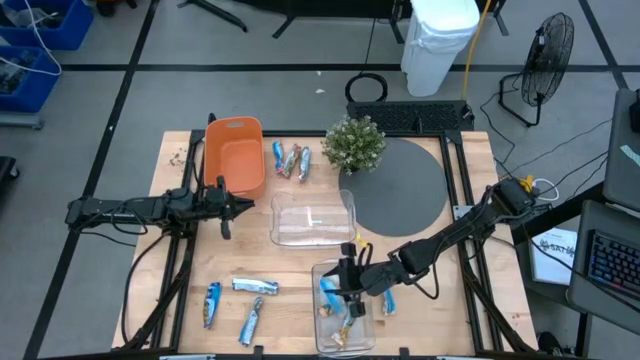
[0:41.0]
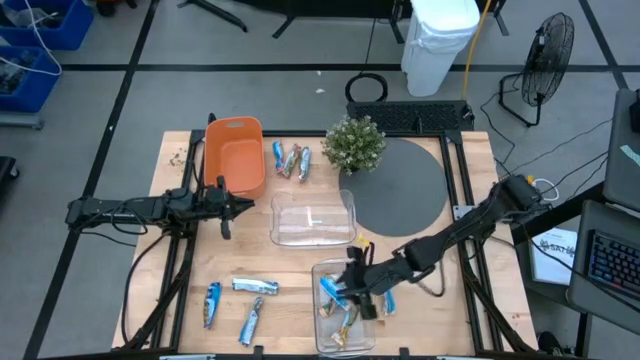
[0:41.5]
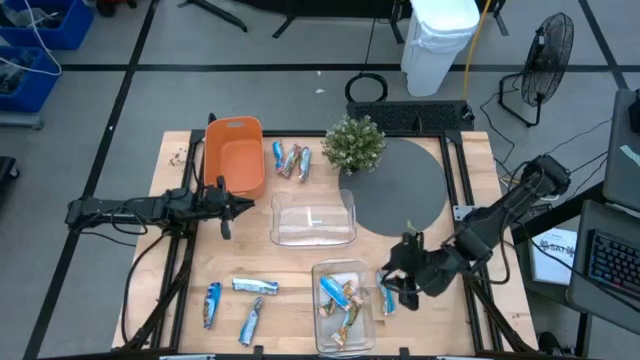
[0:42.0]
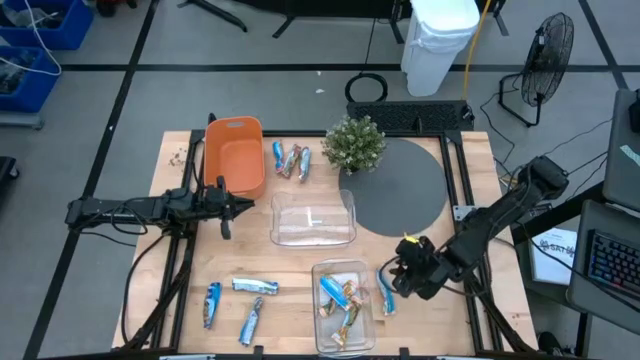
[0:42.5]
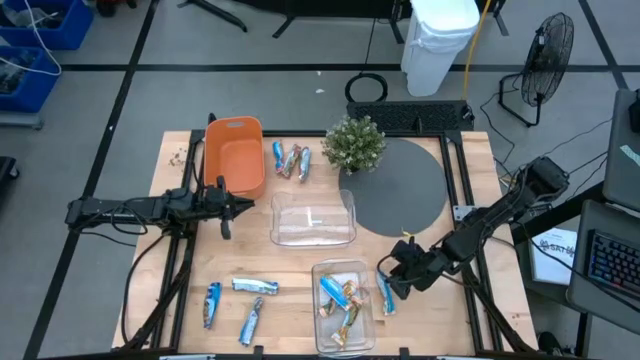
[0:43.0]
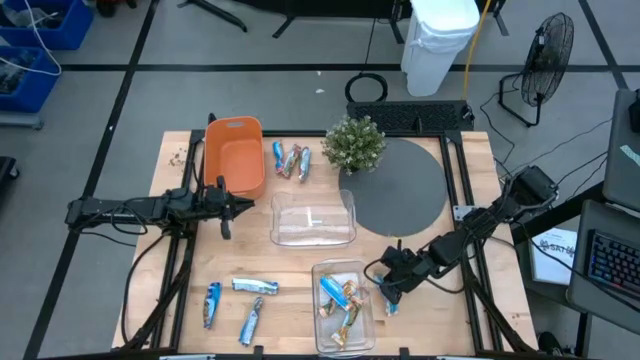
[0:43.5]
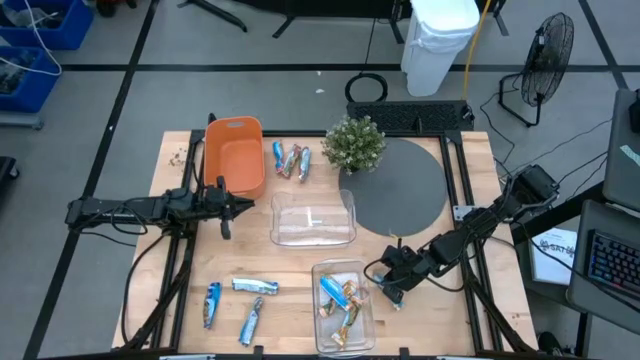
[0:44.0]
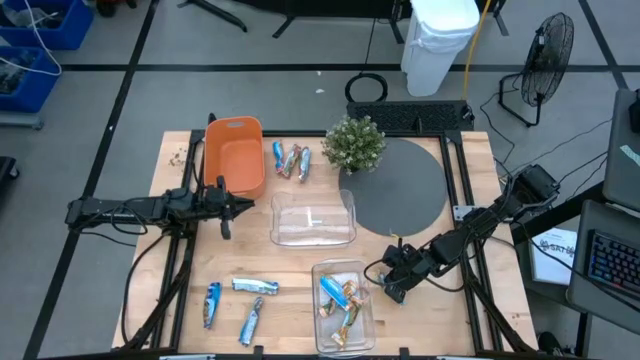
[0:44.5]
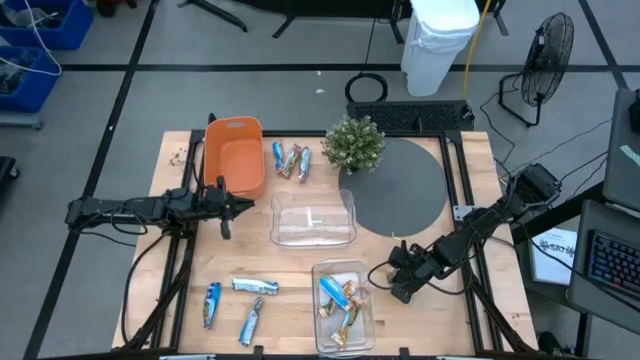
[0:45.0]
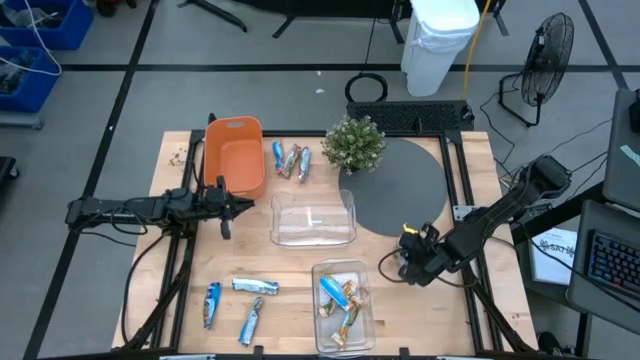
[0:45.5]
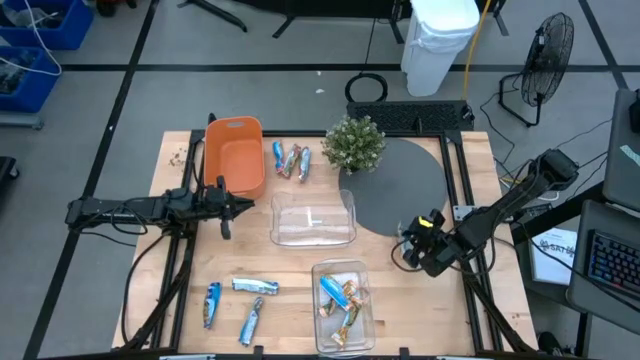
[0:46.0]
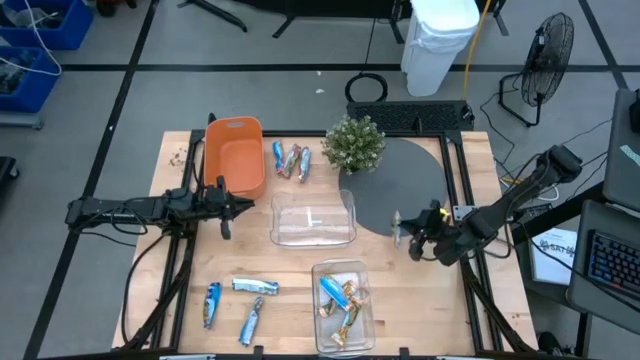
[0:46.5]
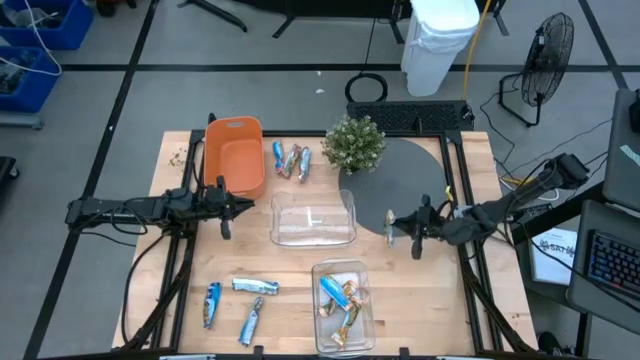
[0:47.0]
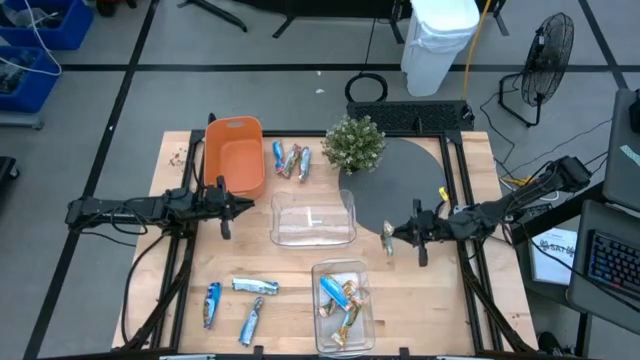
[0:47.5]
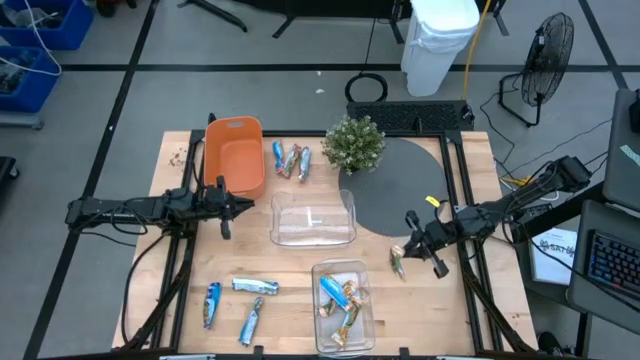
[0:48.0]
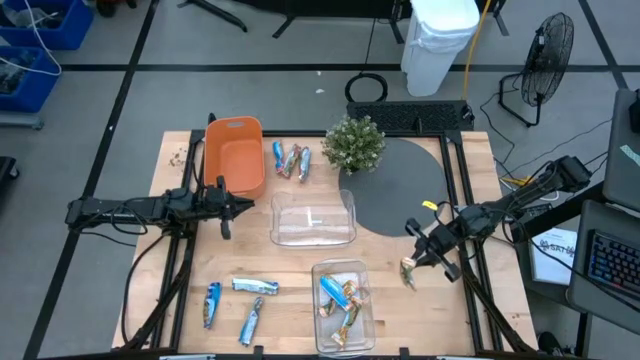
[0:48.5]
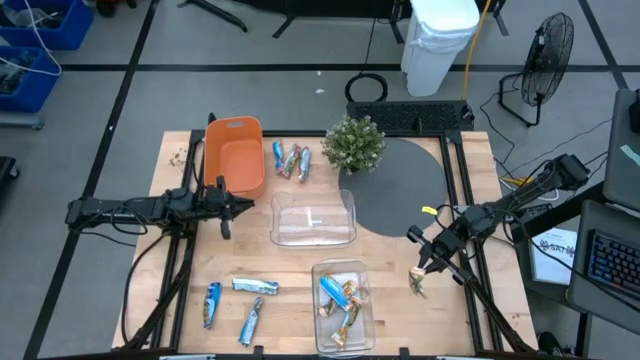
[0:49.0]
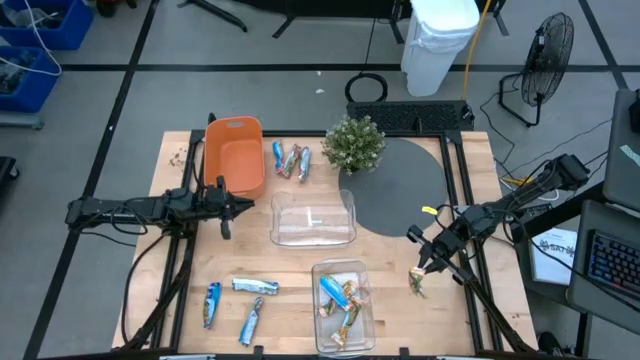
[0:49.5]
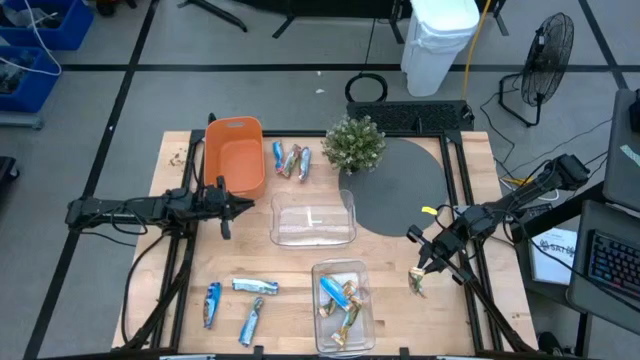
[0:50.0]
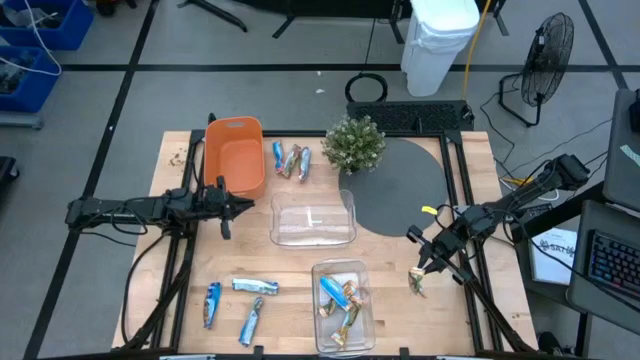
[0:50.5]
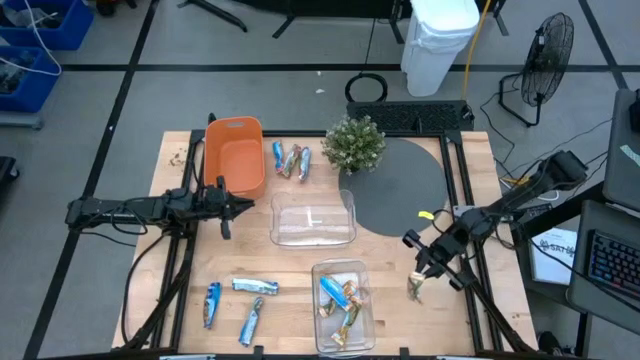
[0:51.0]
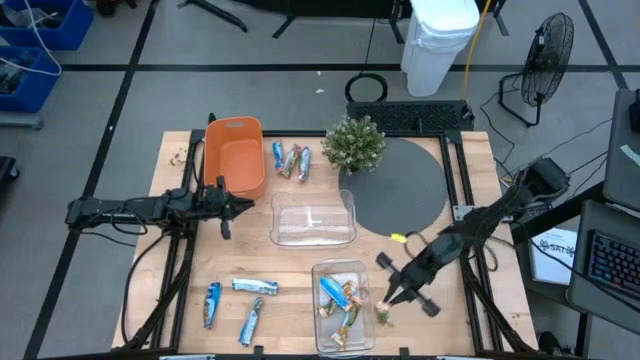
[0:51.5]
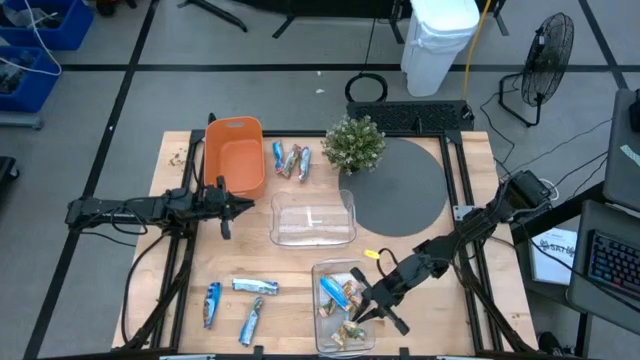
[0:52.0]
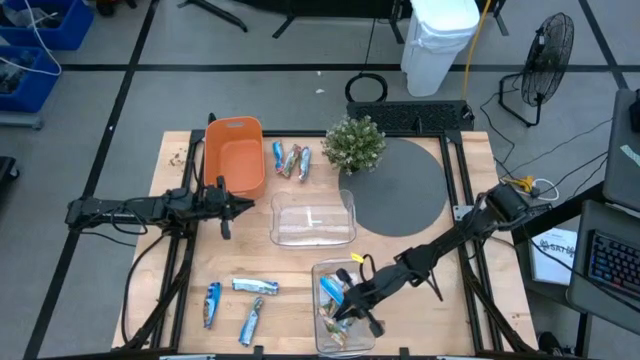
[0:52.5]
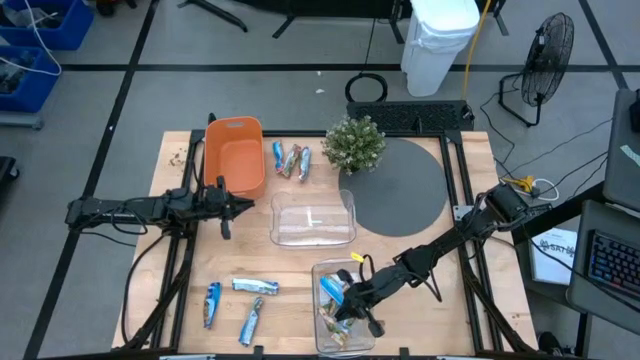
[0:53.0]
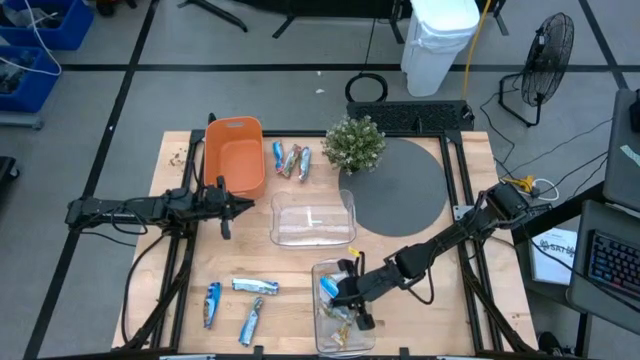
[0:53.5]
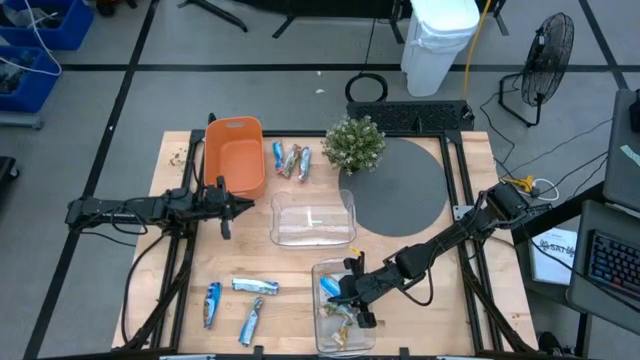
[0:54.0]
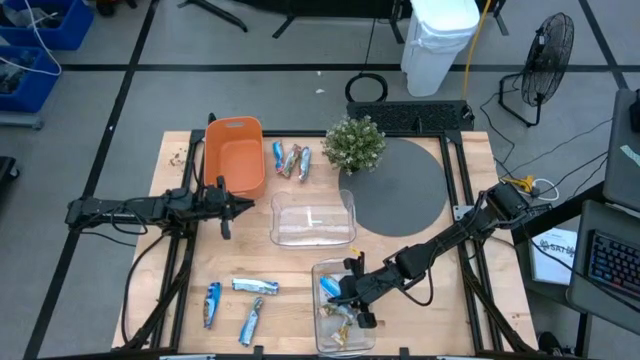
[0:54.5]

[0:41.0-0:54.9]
Task: Pick and place Granola Bars by type
Put the yellow granola bar into the bottom transparent bin

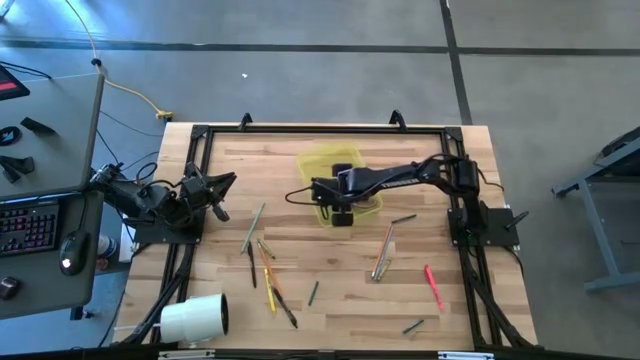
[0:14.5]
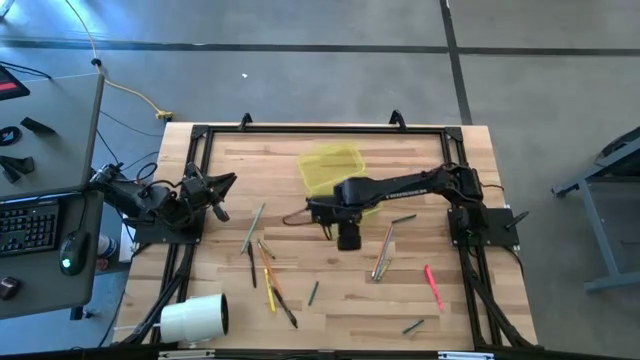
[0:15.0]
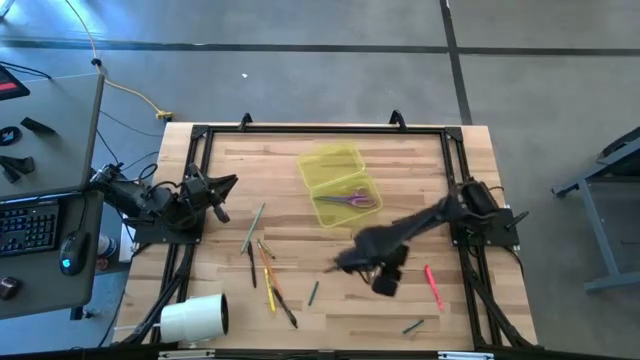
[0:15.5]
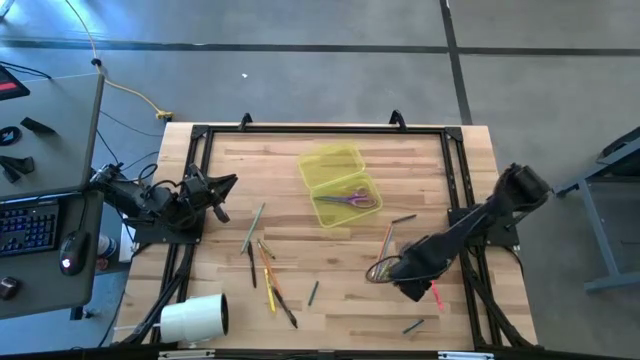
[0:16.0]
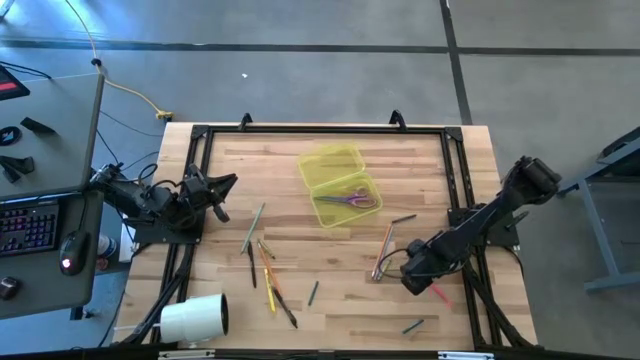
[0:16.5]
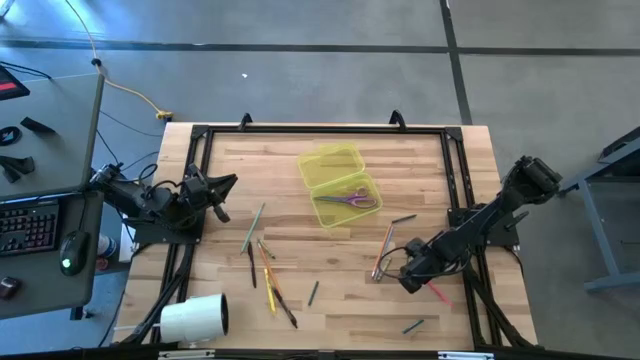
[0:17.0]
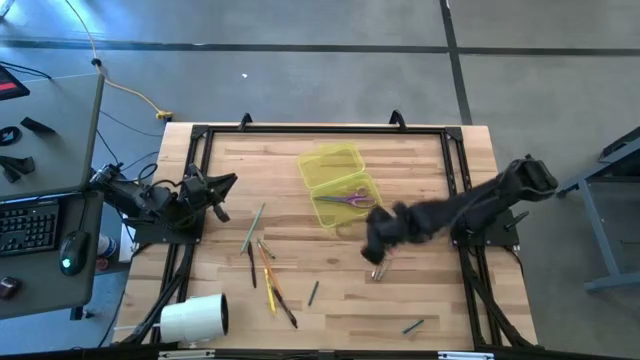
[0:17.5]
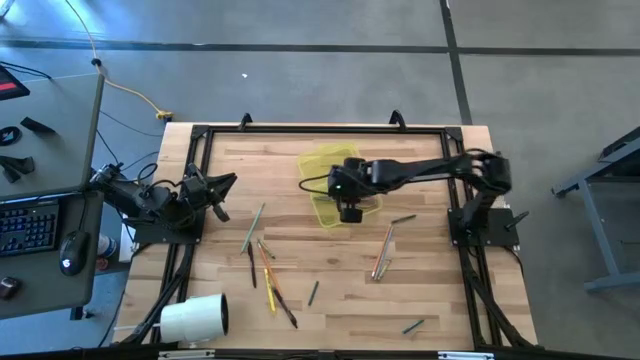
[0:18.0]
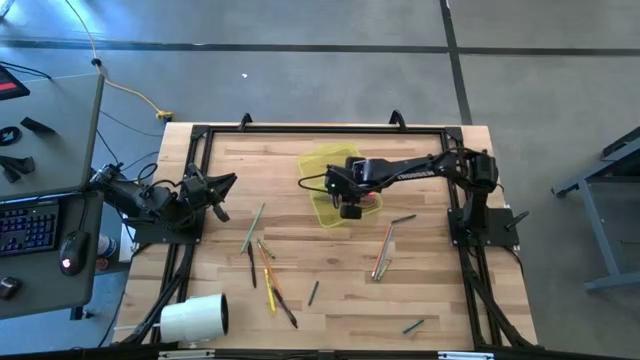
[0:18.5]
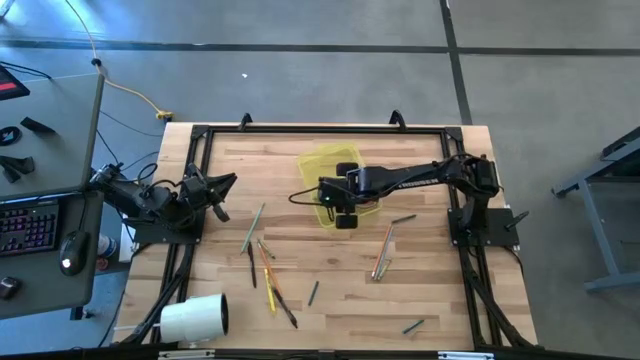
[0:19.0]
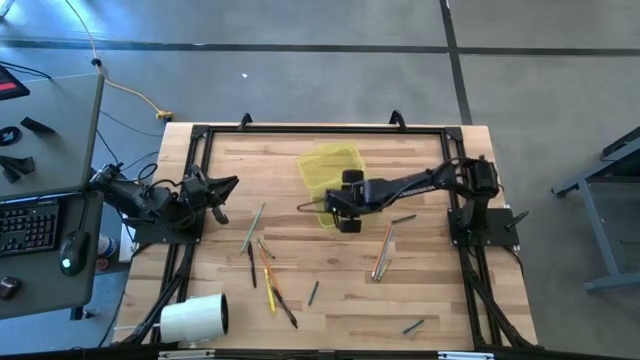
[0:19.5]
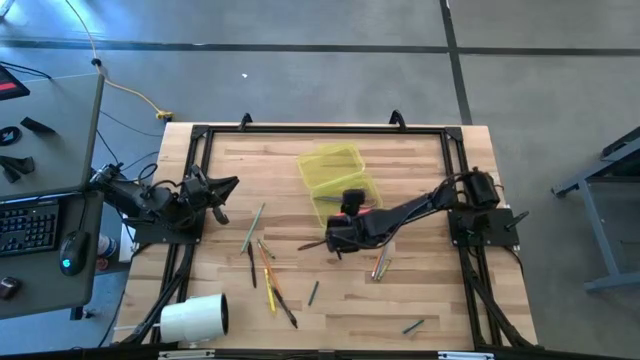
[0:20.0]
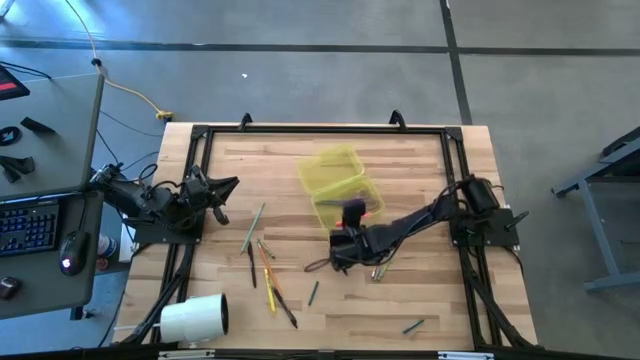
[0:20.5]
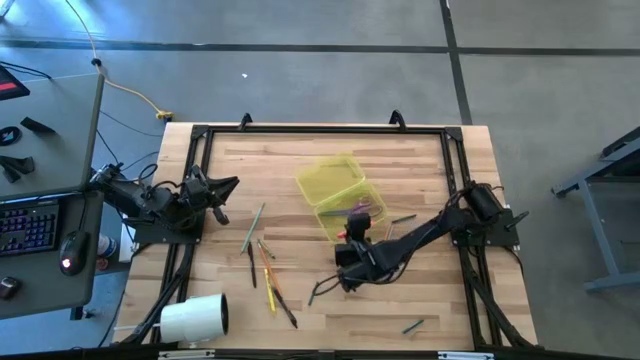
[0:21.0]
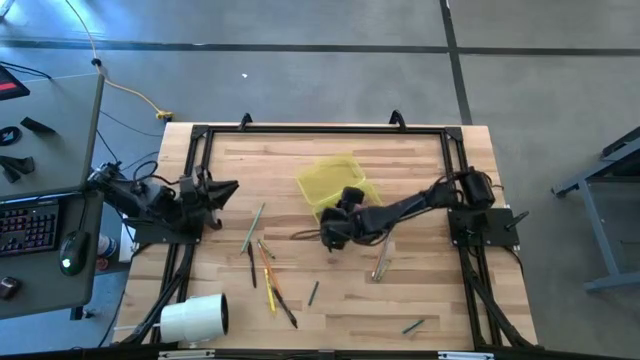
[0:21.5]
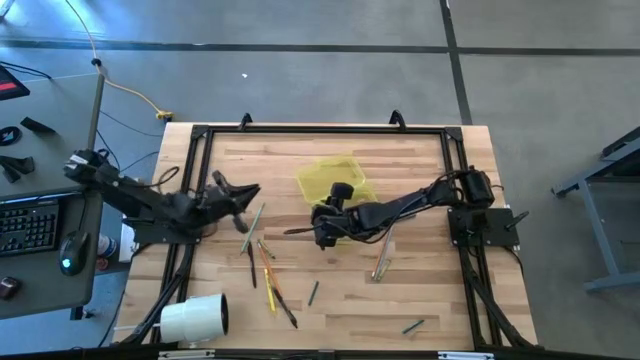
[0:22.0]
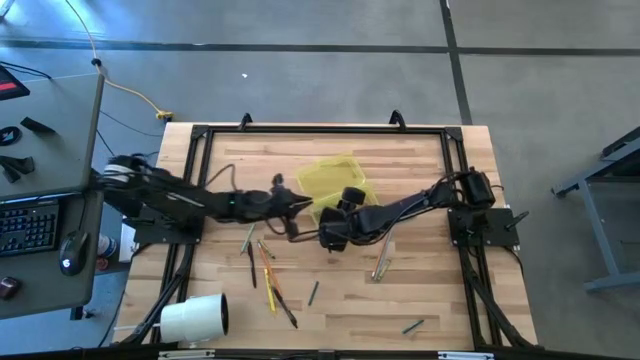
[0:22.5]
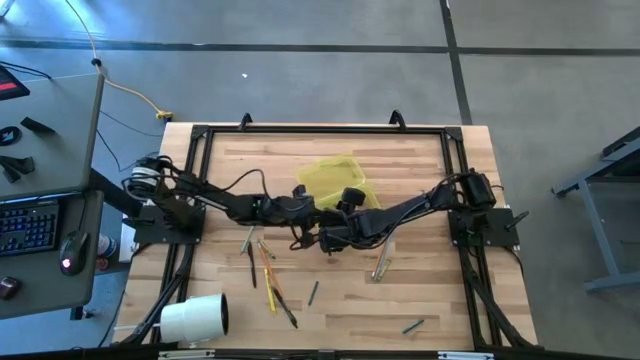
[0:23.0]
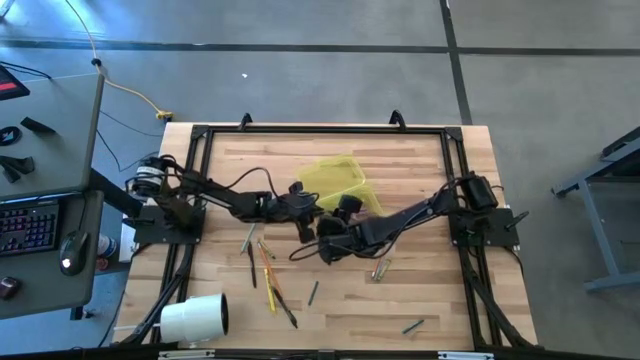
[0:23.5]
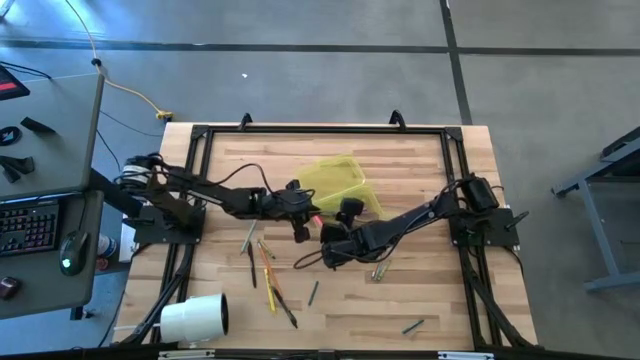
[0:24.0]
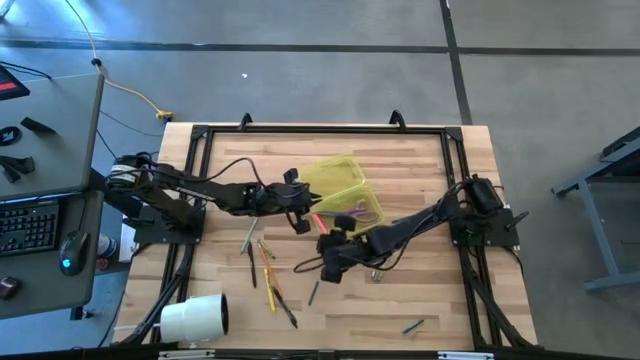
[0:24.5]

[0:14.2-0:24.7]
Task: Pick & place school supplies into a supply box
Put the pink ballpoint pen into the supply box
